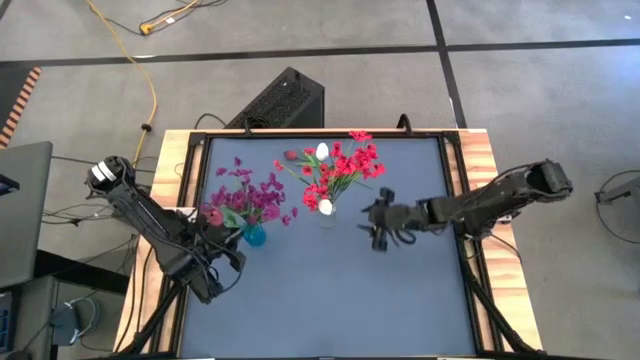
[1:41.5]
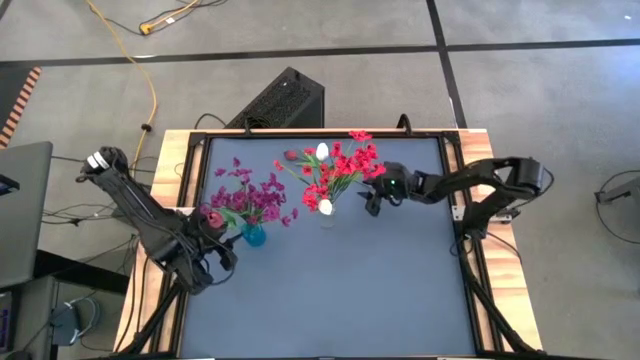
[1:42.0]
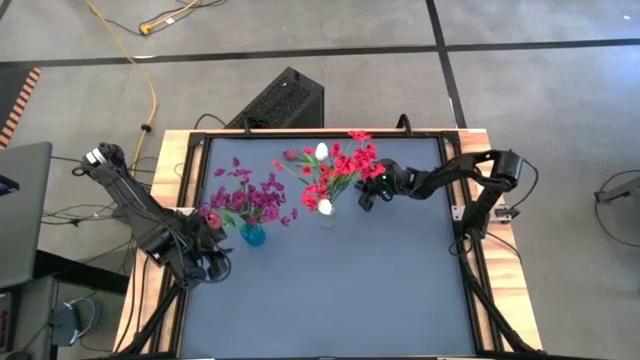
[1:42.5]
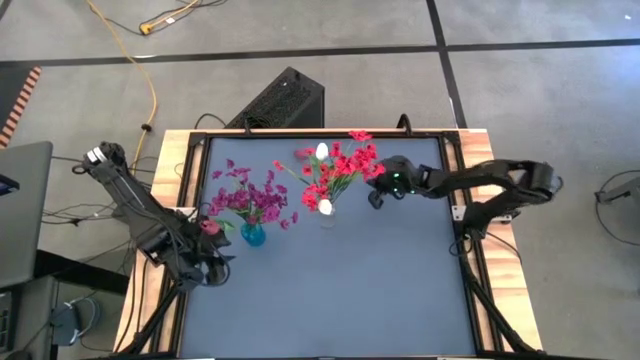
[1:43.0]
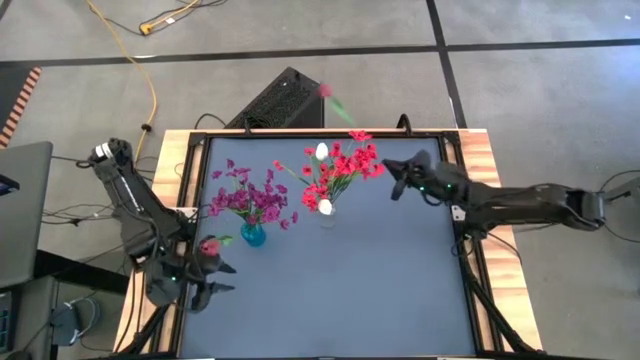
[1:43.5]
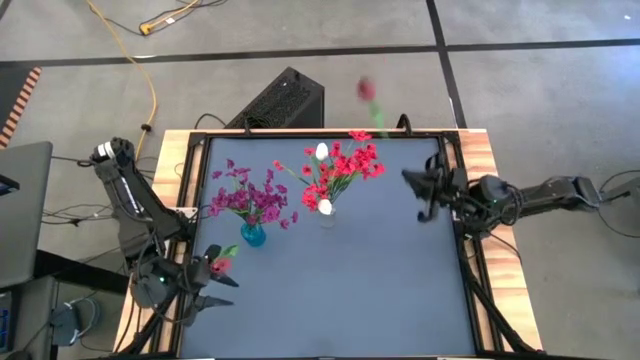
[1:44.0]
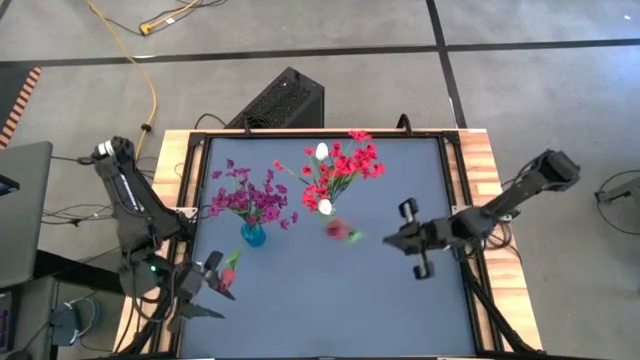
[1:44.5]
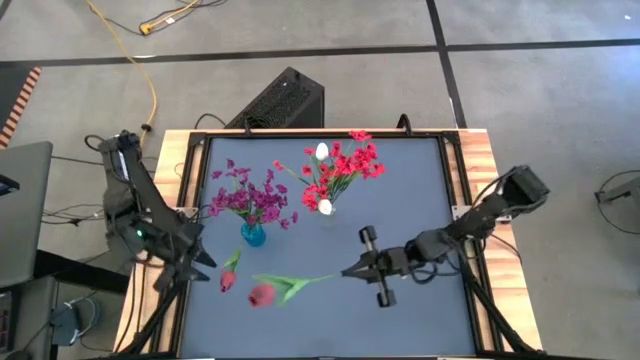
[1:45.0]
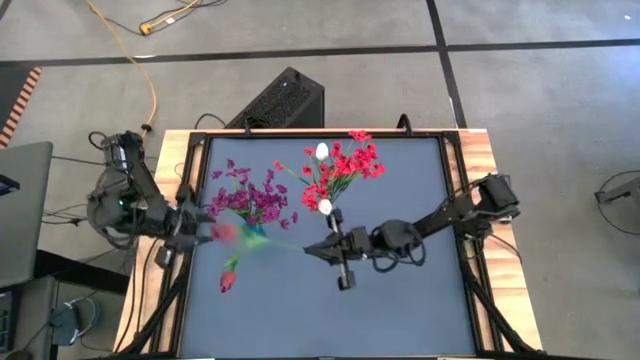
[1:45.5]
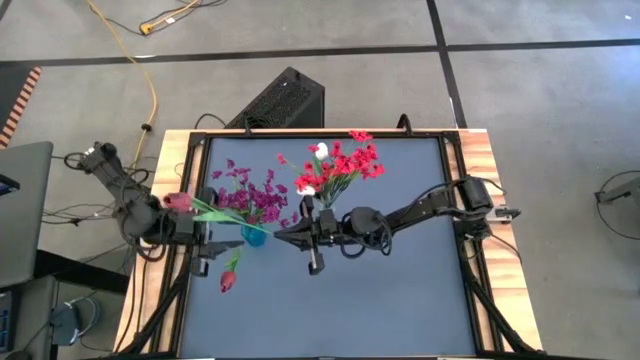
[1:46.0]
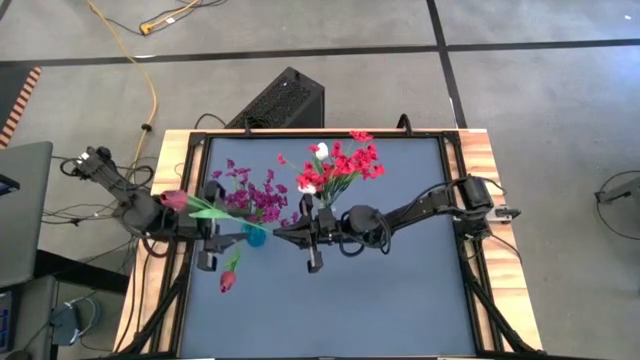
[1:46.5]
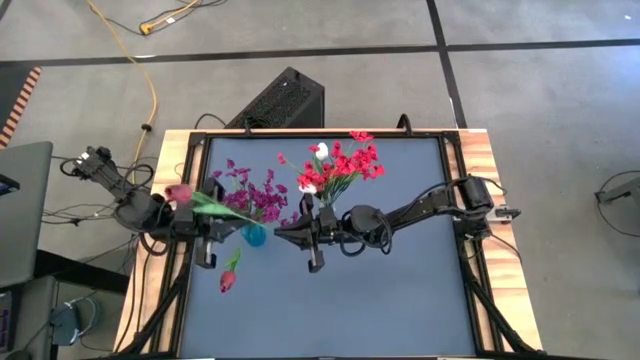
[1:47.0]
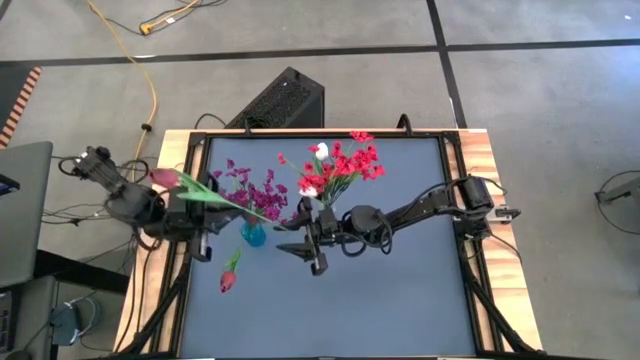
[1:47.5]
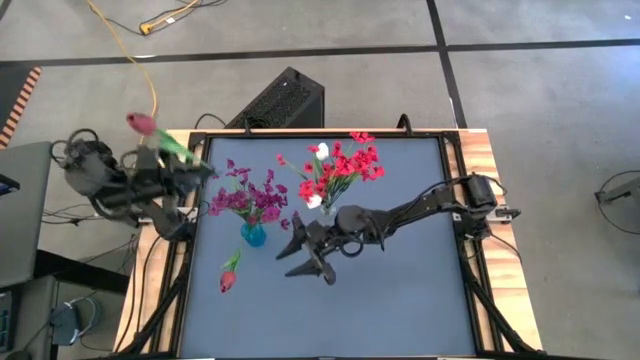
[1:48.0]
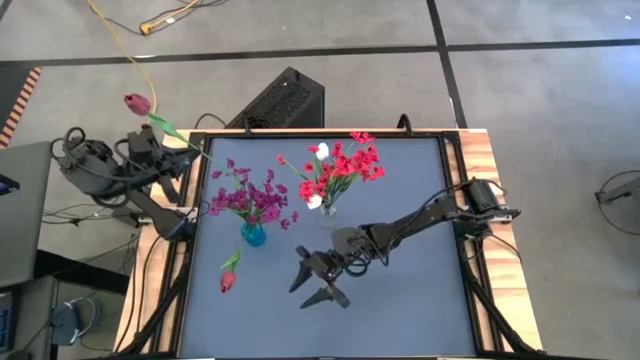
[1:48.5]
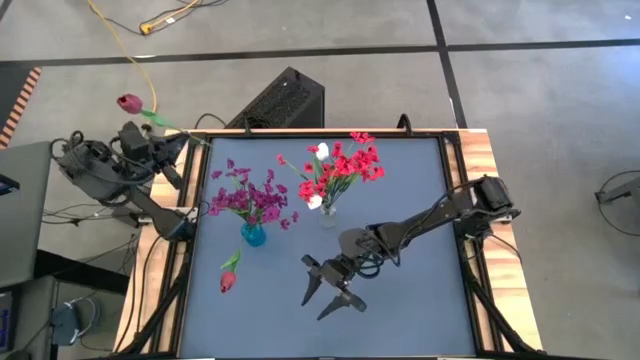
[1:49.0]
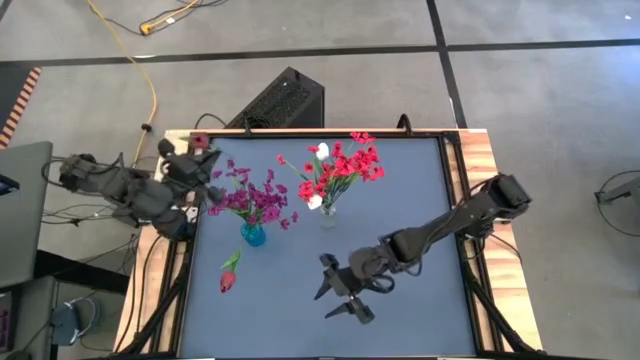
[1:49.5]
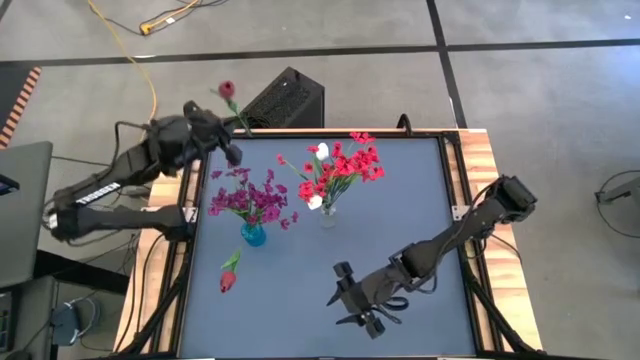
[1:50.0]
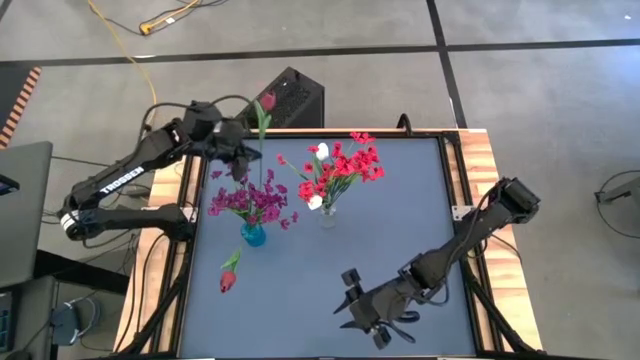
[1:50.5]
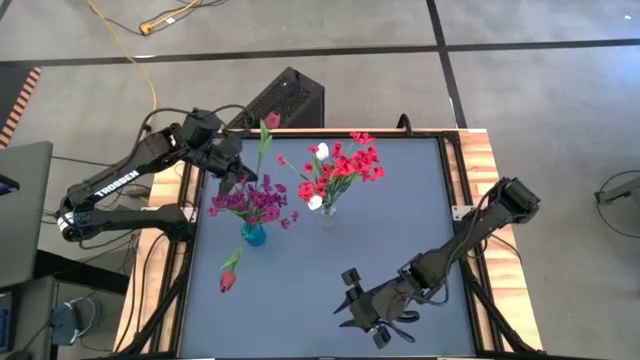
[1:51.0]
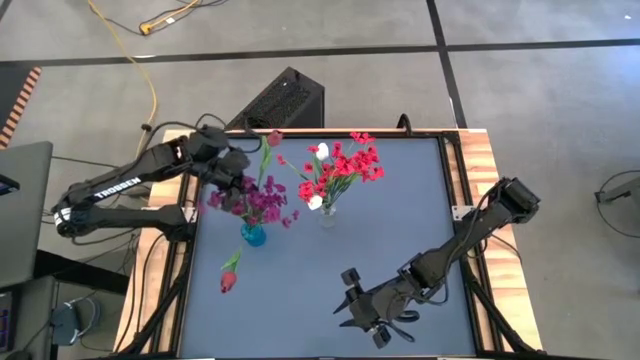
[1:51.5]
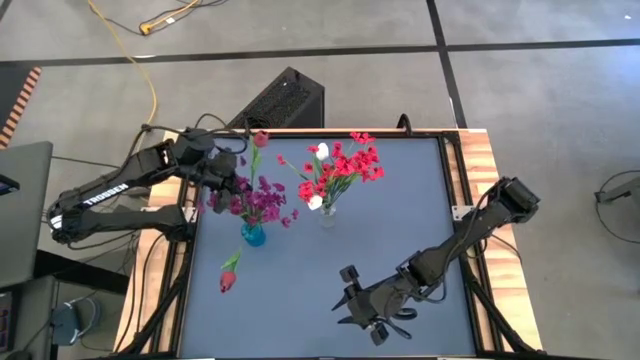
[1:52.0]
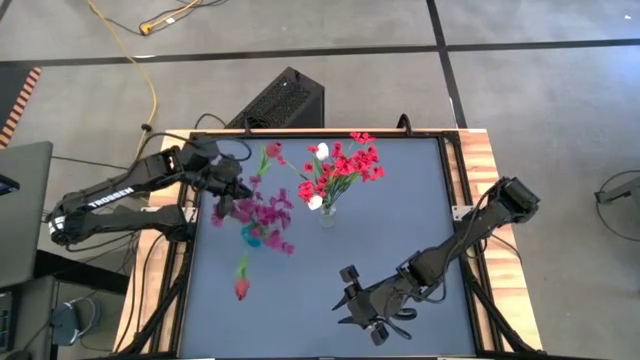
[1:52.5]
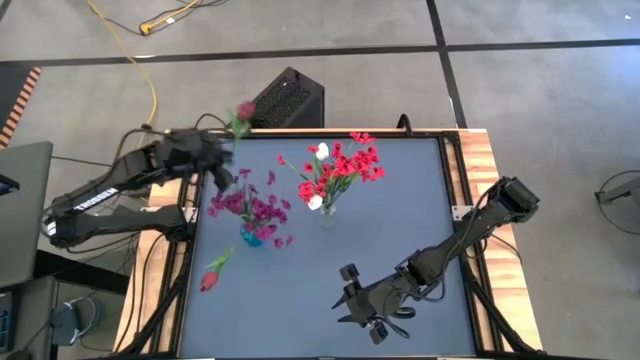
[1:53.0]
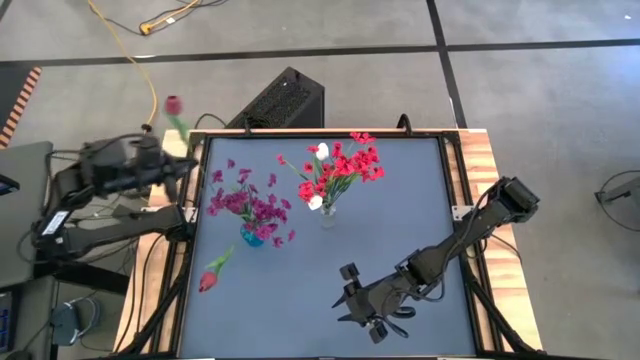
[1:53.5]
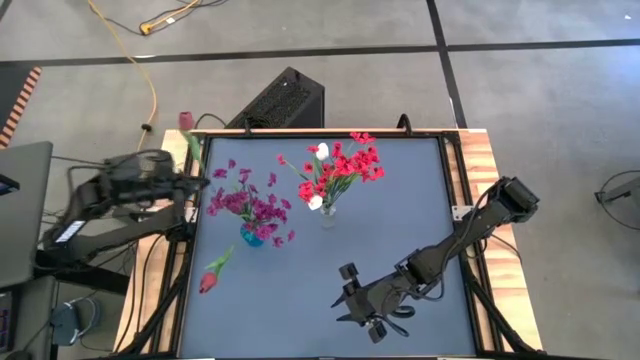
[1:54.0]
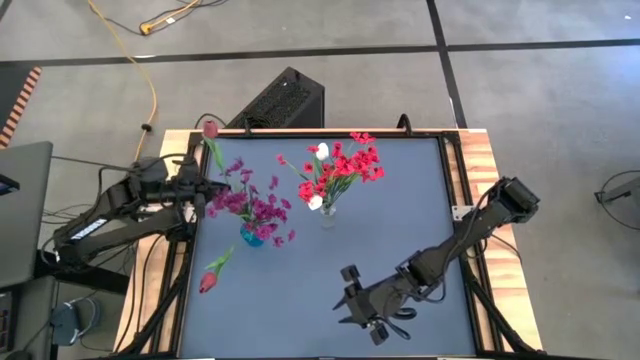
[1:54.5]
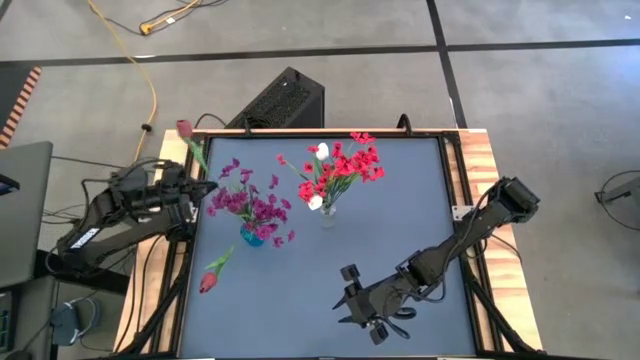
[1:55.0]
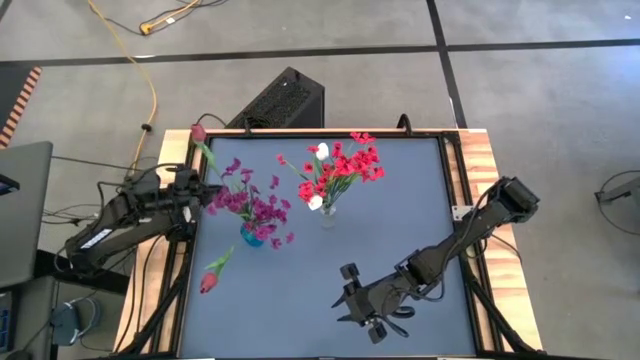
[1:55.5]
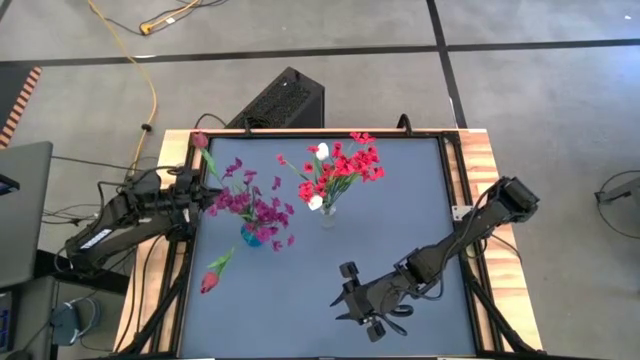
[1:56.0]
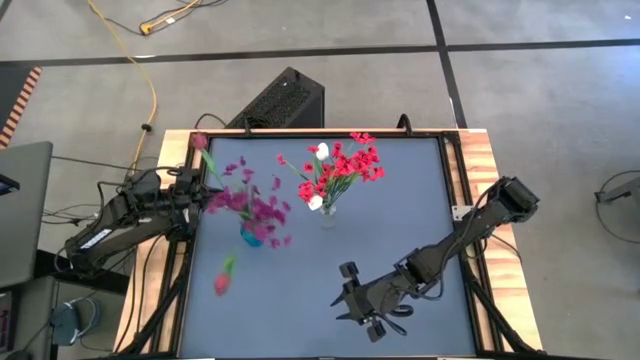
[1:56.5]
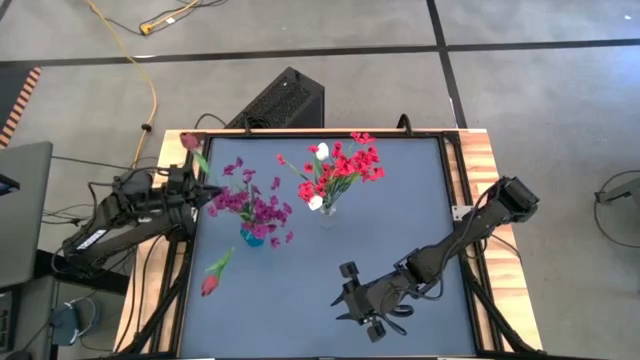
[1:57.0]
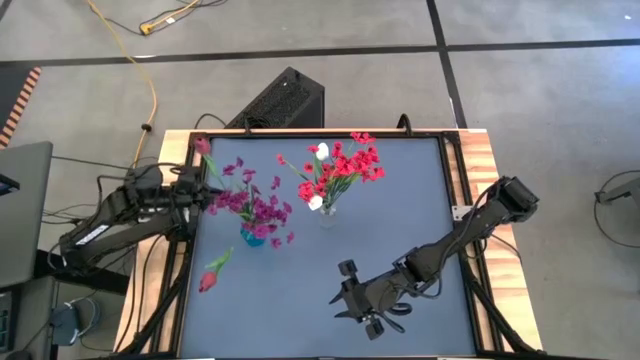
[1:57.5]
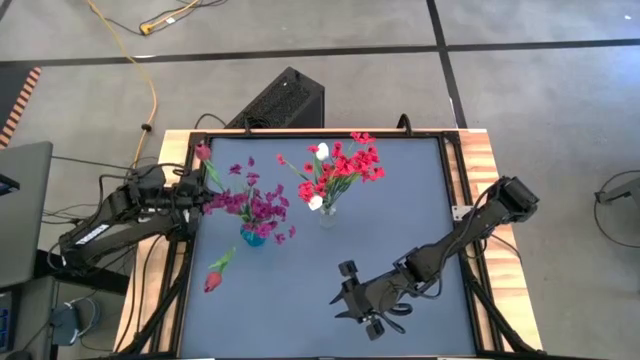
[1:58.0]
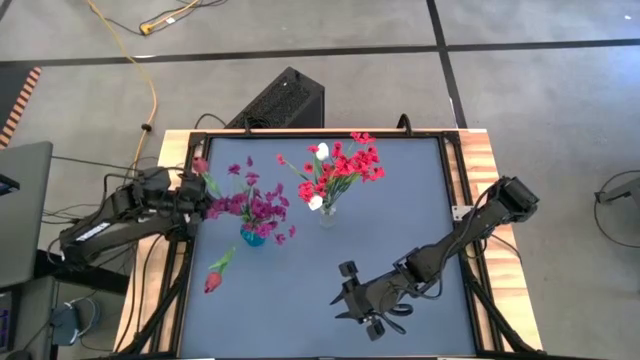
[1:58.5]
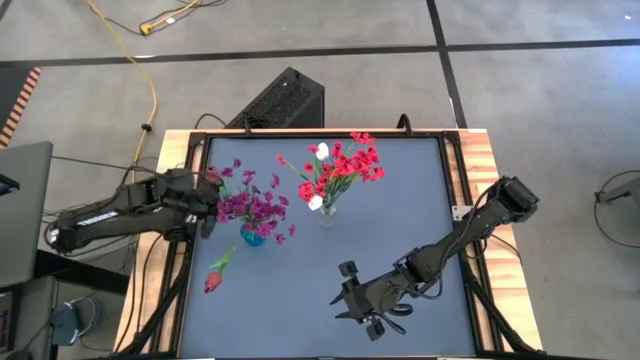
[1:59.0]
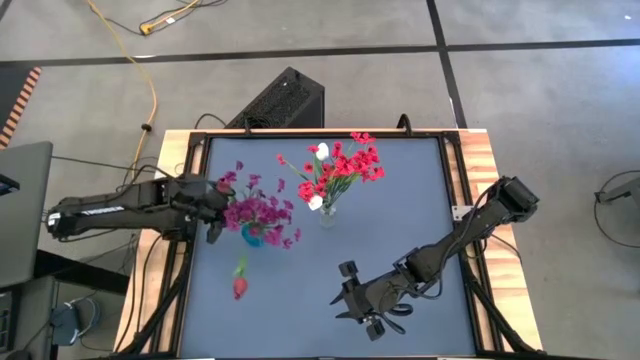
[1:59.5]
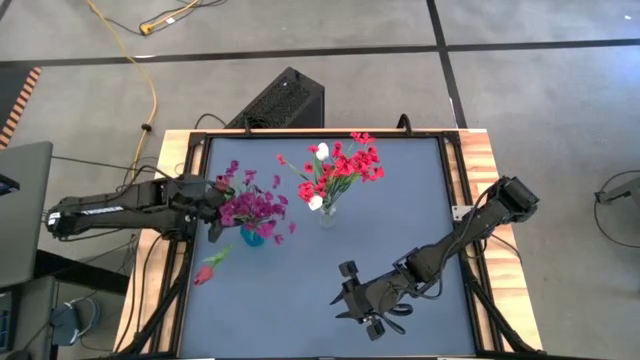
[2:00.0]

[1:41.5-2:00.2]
Task: Sort flowers into vase by color
Put the red tulip into the blue vase

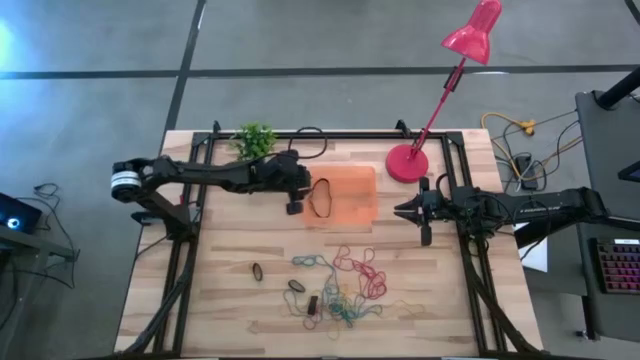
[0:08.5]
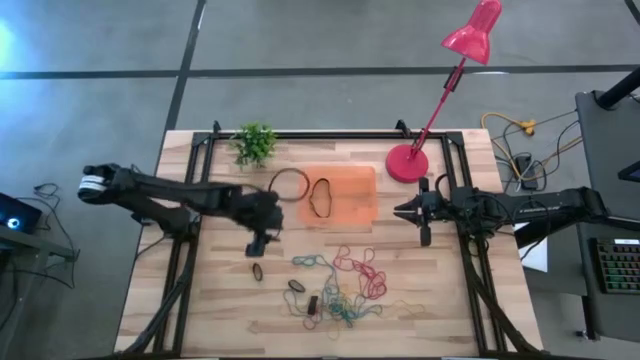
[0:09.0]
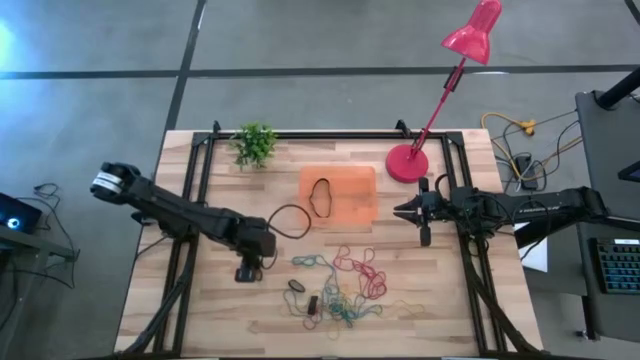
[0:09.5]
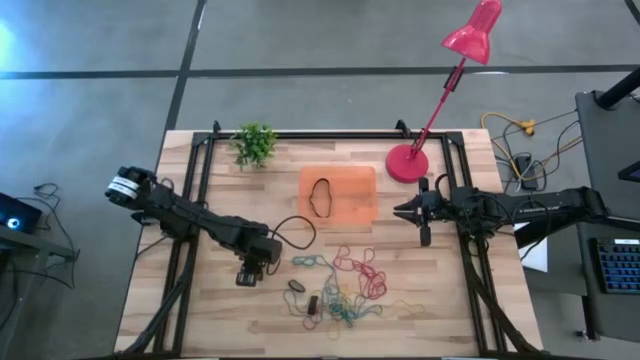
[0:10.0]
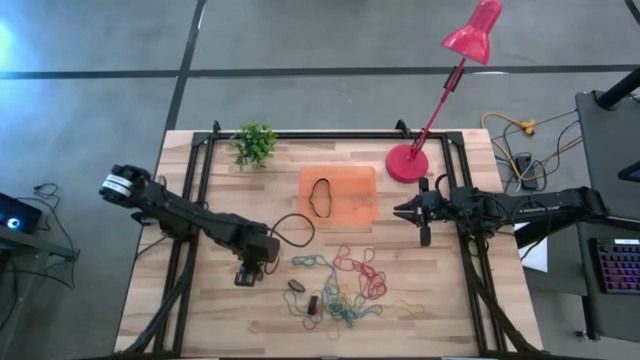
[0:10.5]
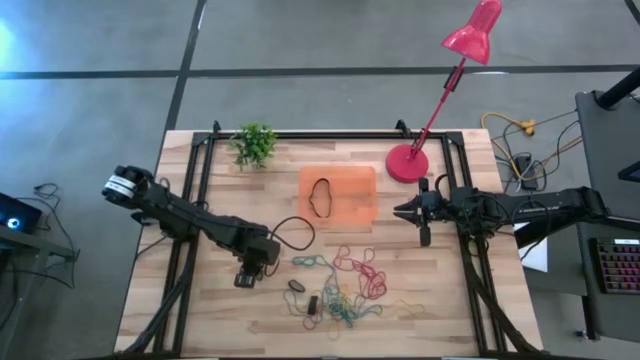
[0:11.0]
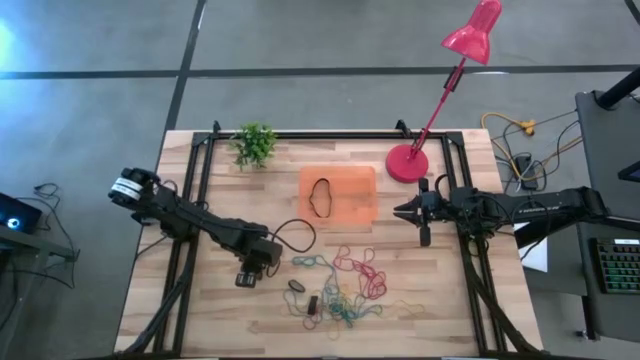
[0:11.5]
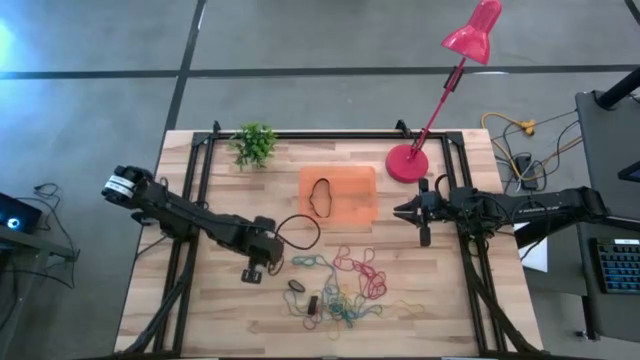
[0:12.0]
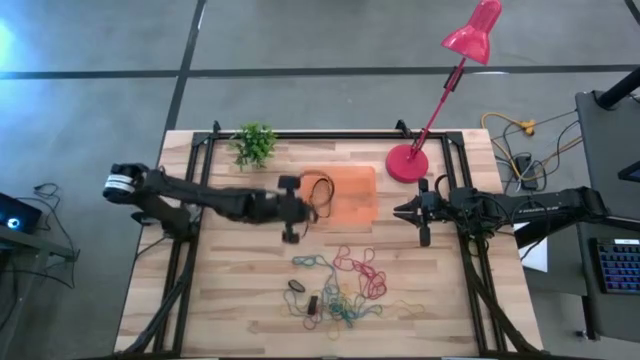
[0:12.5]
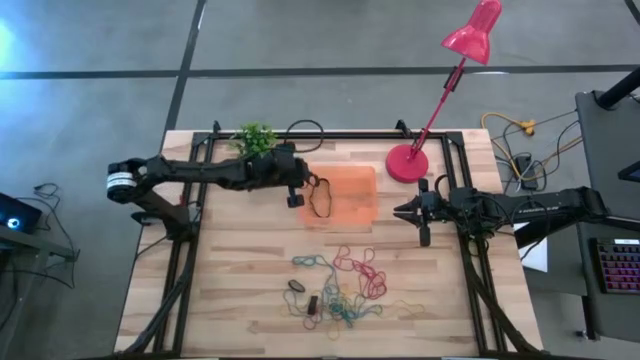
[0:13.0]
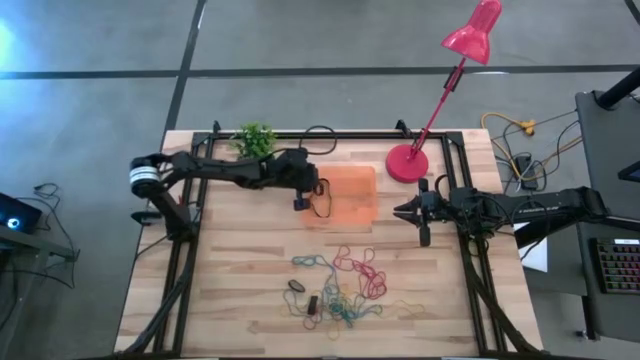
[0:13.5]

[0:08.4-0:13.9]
Task: Pick and place rubber bands into bin
Put the top black rubber band into the bin
